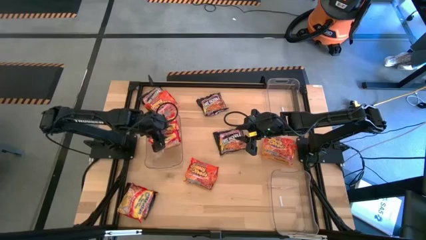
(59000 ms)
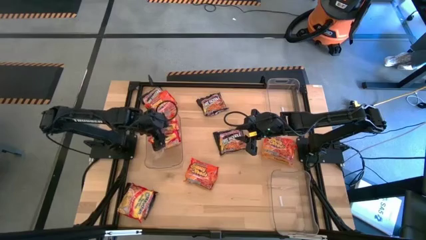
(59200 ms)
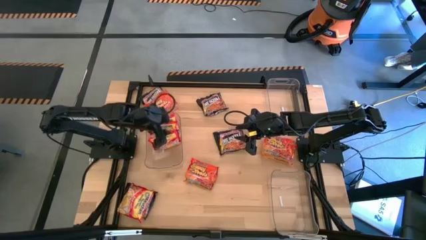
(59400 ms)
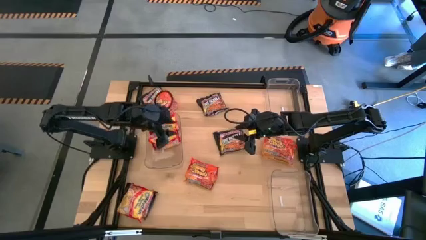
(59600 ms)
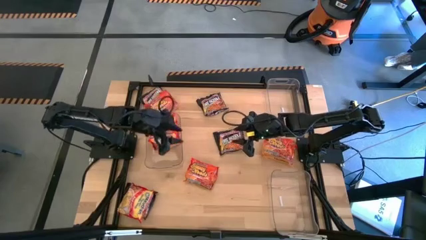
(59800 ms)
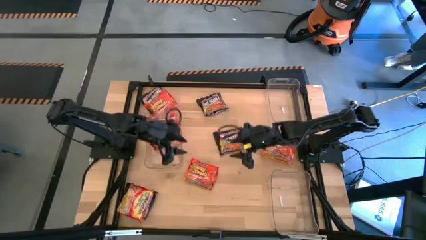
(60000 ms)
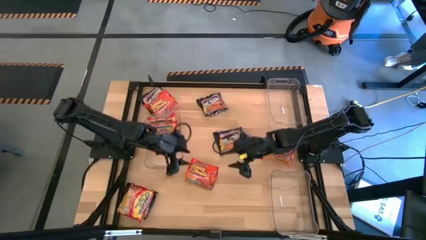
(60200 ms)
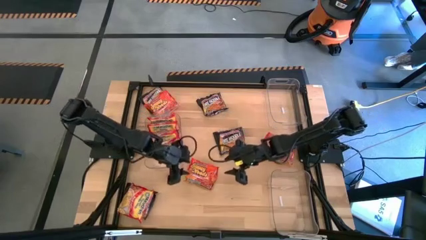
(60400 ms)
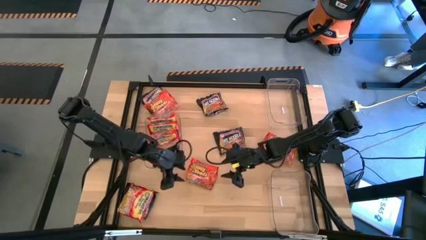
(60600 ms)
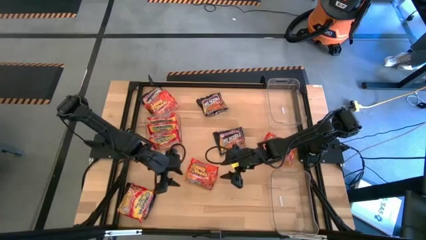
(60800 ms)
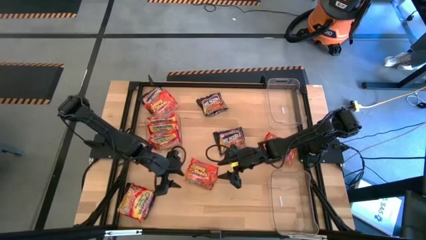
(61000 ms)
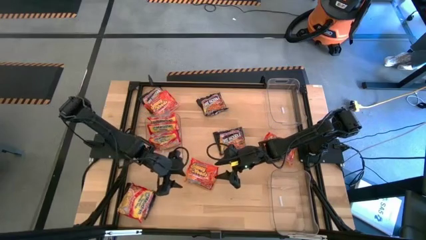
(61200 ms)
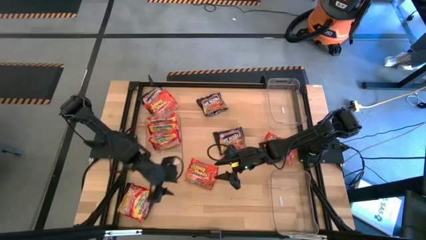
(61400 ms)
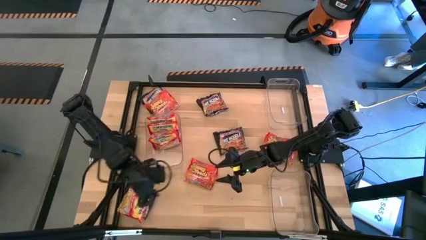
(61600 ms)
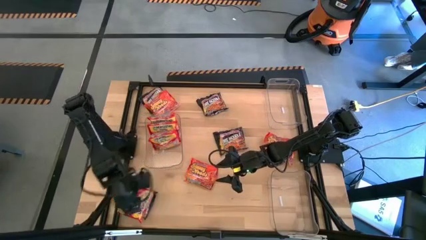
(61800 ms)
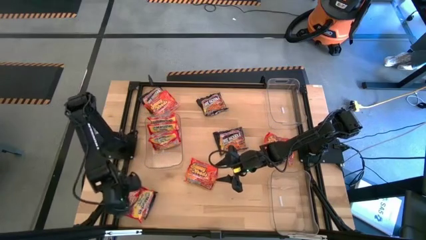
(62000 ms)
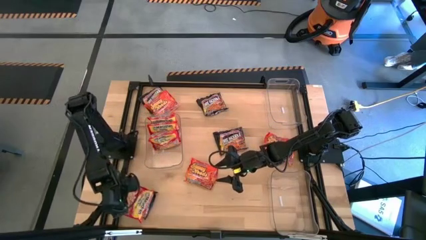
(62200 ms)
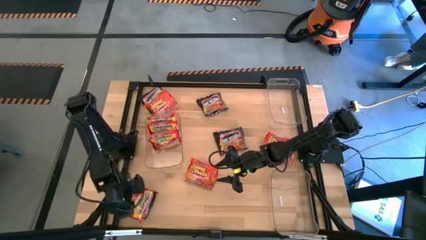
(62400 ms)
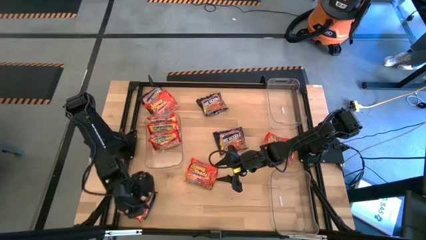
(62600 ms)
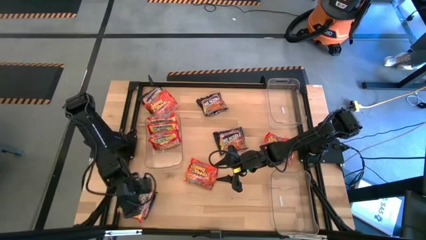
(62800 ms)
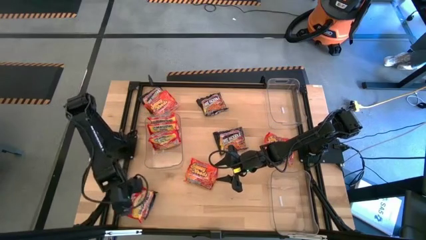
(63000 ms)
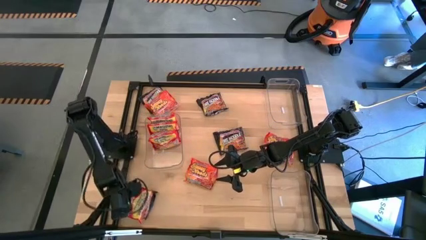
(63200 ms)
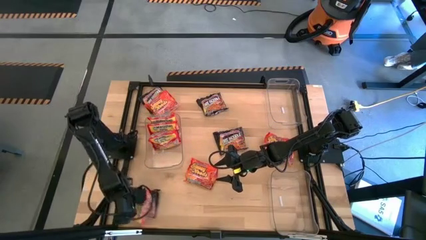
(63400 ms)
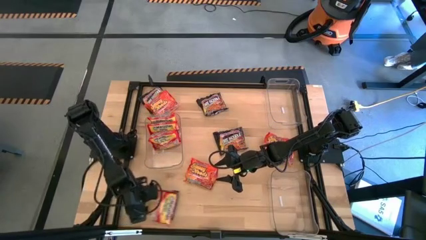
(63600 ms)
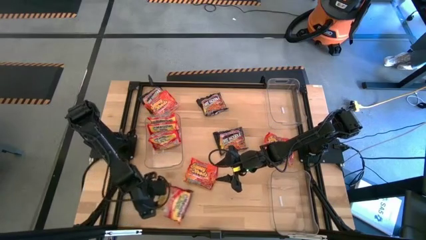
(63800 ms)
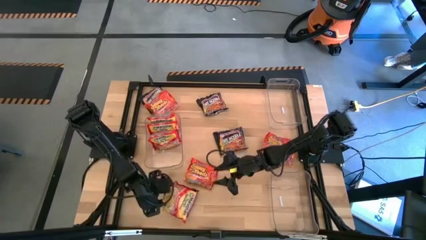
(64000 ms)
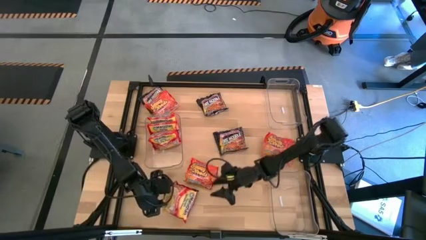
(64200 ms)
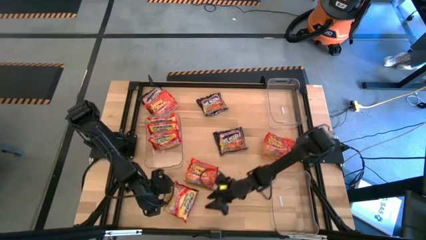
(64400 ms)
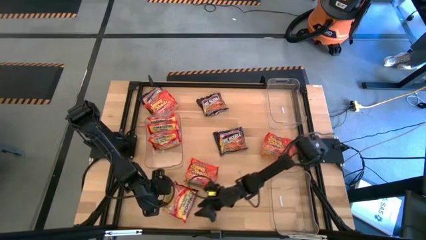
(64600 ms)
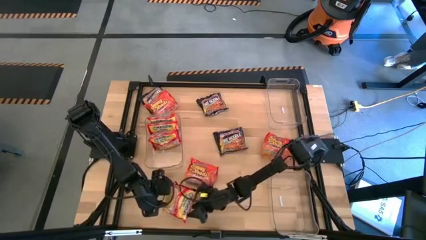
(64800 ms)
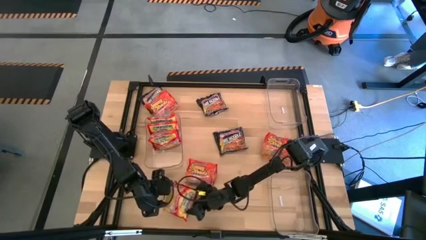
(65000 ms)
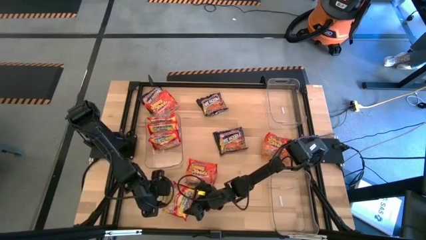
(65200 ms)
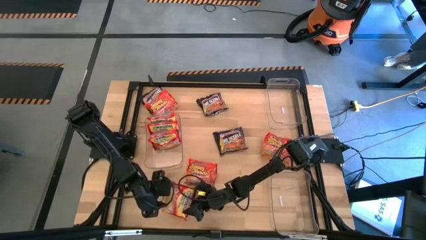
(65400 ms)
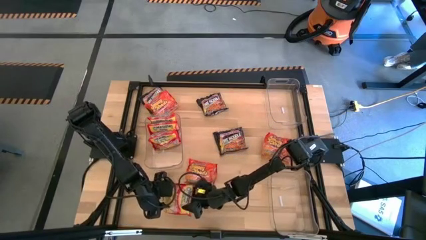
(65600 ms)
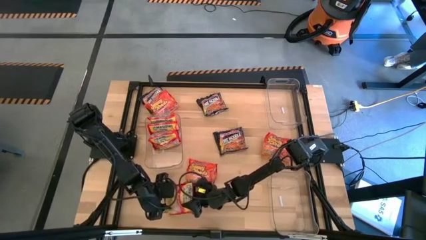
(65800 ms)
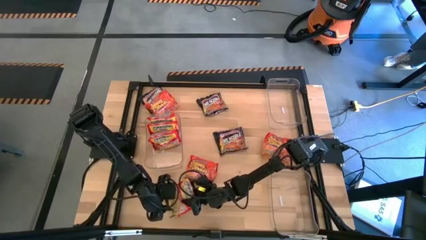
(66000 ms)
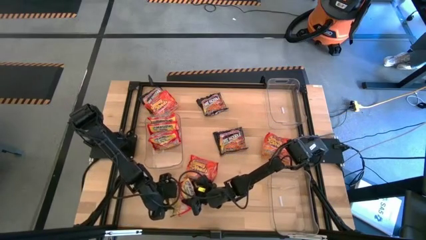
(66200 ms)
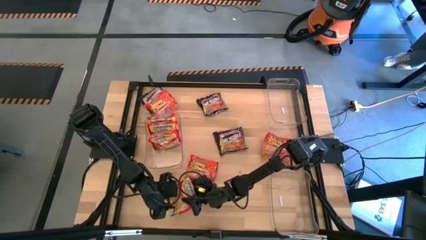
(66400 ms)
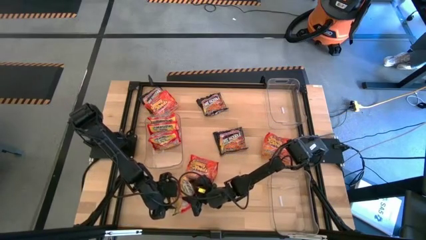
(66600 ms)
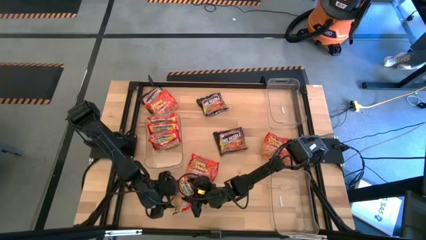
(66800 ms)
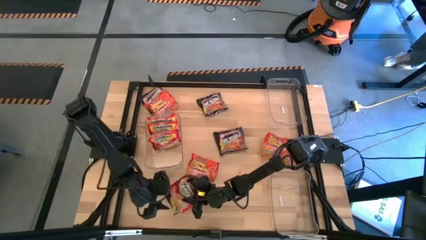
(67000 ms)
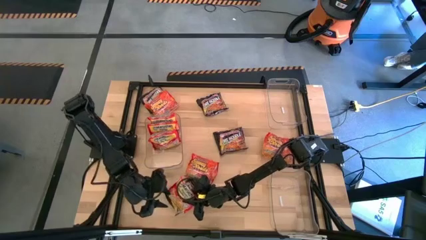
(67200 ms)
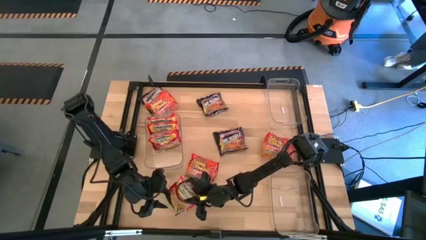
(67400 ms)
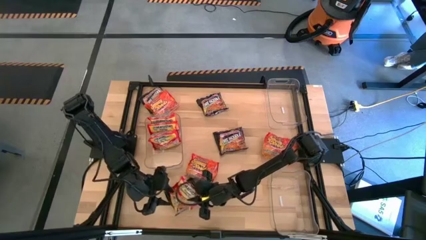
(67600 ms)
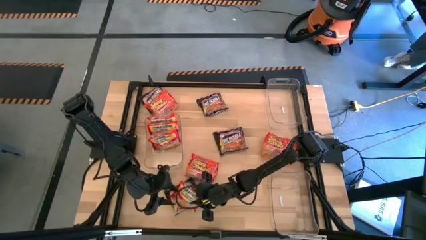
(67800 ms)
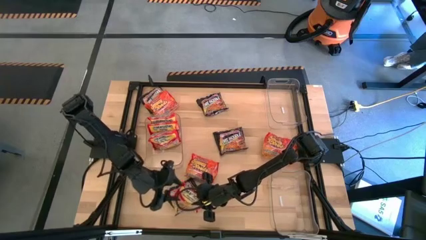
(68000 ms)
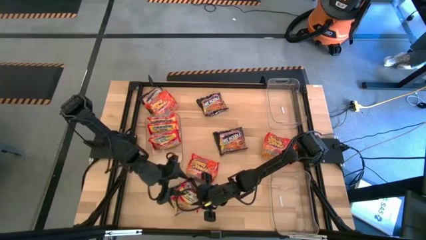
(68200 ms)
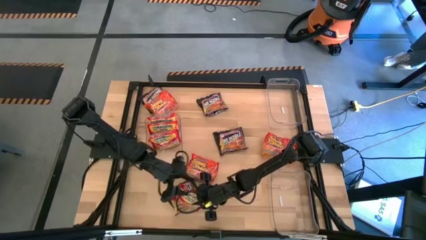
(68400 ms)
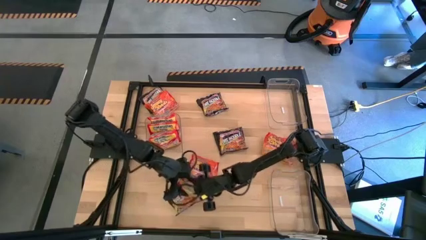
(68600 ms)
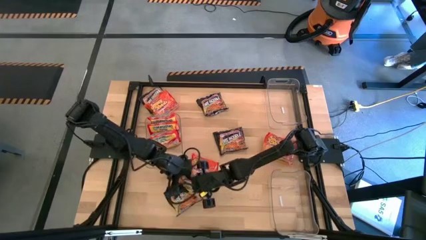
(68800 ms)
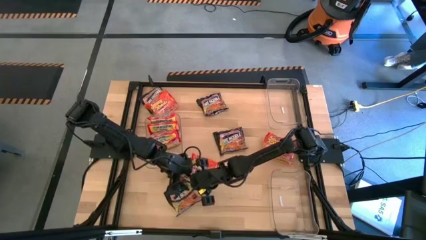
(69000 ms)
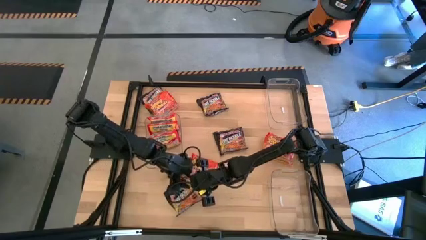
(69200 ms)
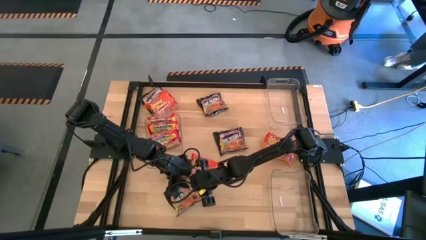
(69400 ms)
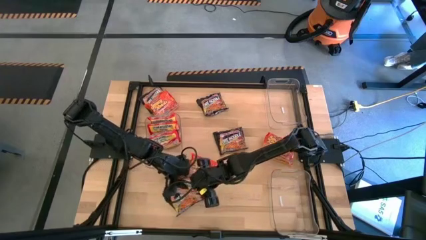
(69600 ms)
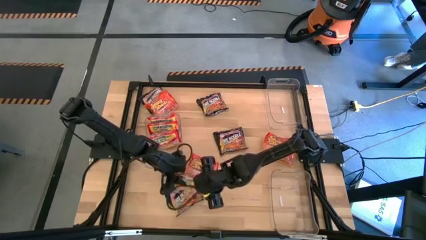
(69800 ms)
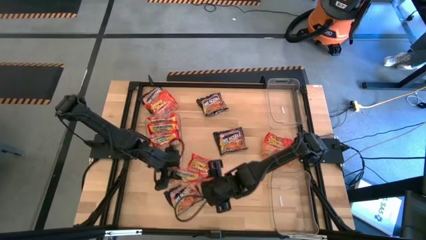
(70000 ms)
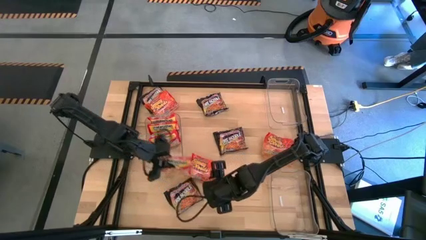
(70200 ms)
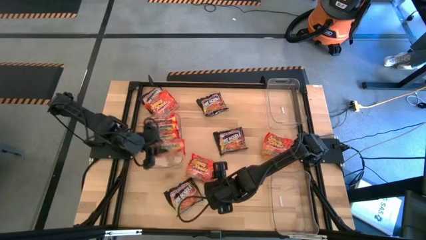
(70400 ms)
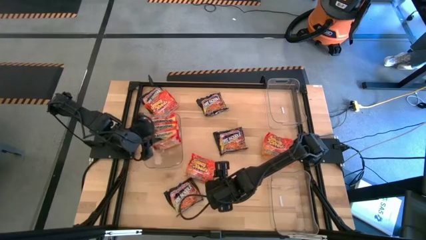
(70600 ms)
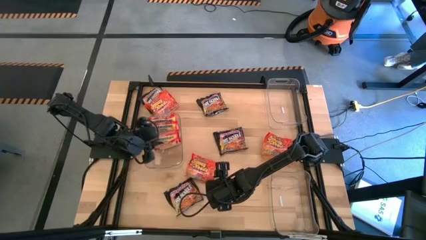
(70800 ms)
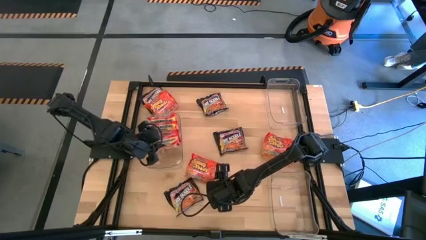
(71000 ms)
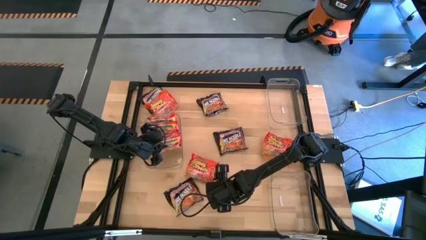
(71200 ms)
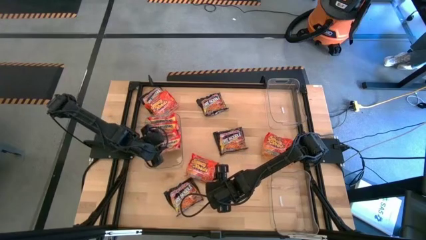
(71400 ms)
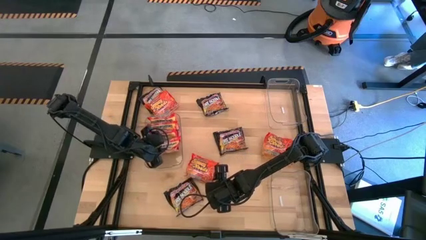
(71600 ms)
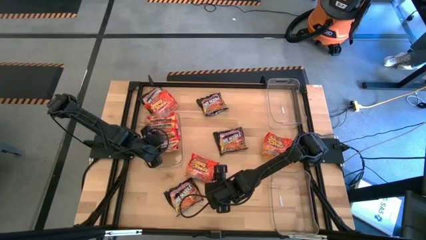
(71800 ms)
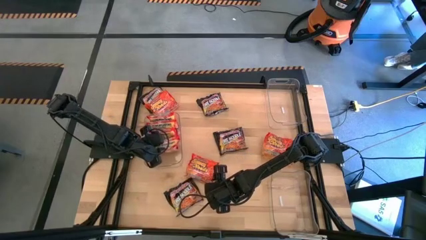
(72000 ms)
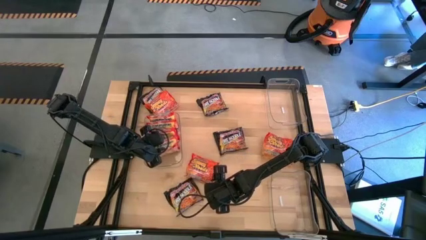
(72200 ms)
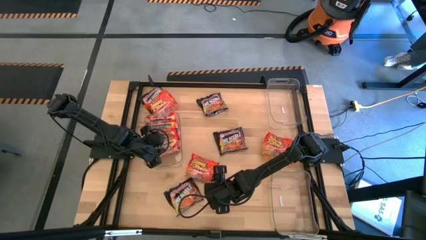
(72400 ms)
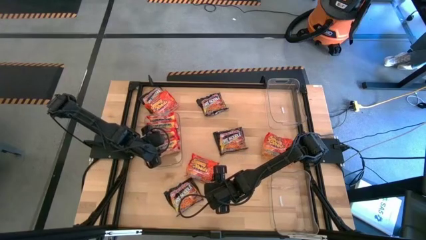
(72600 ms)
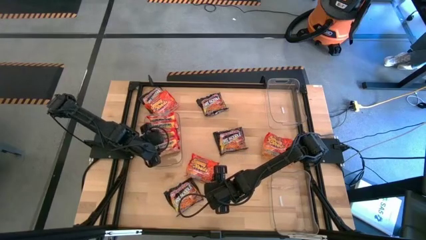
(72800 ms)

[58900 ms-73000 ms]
Task: Sort Maruchan noodles
Put the red noodle pack into the transparent bin
